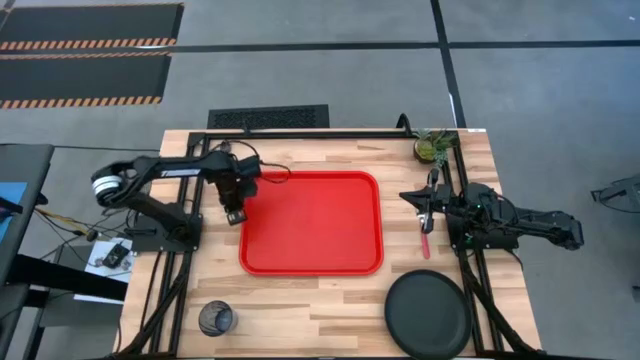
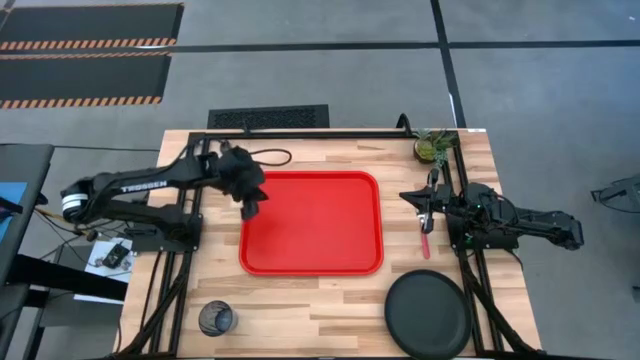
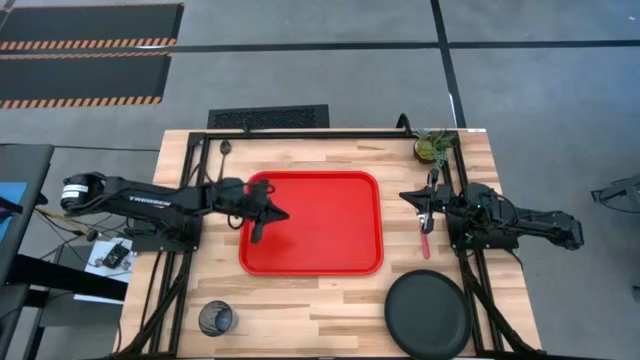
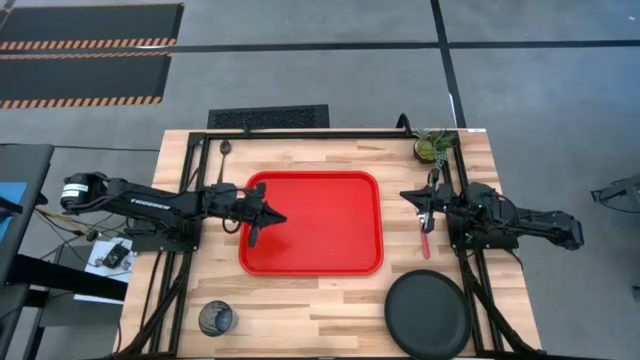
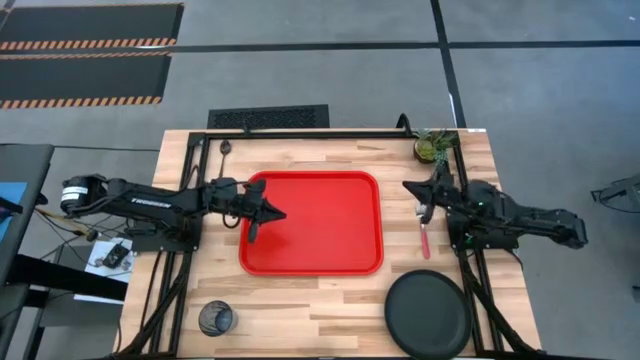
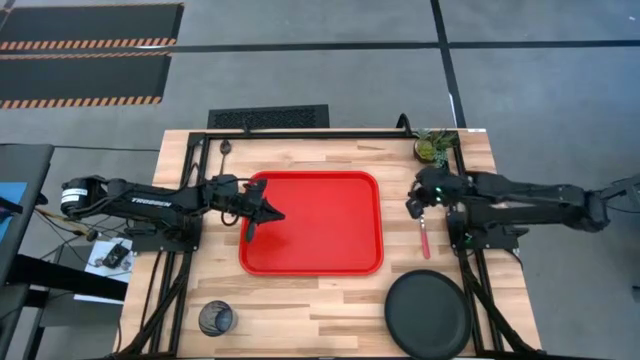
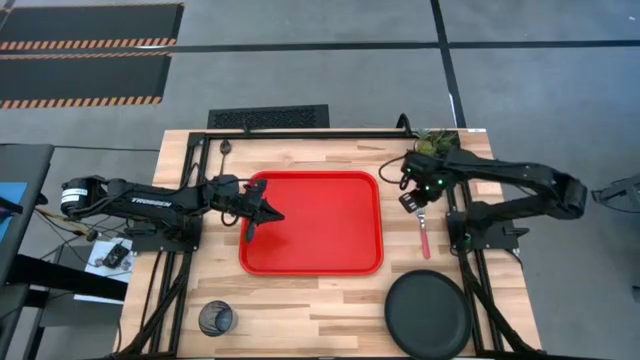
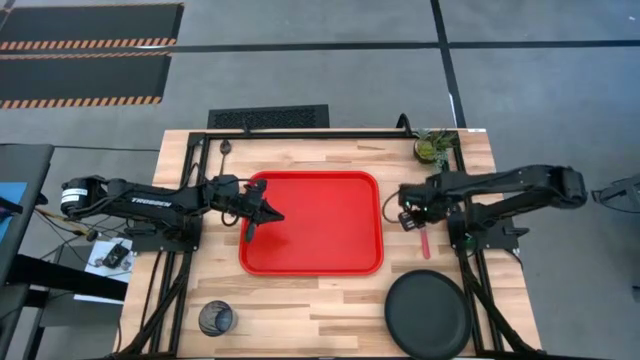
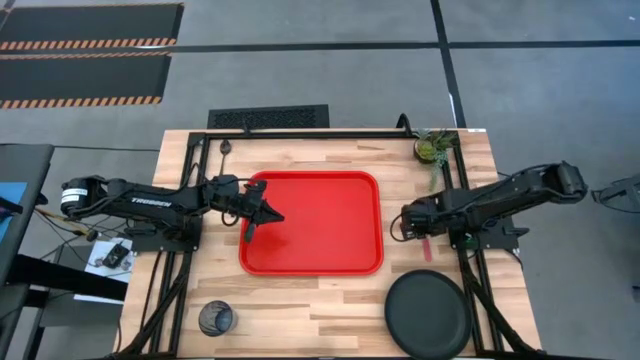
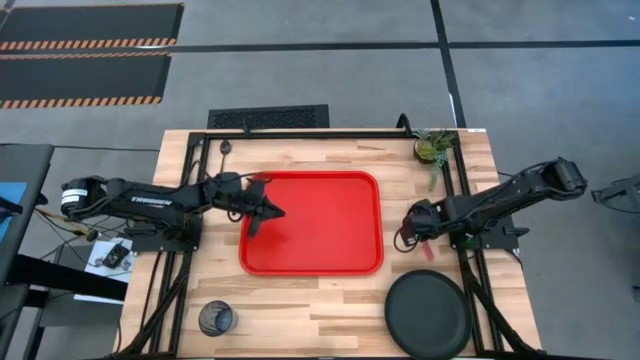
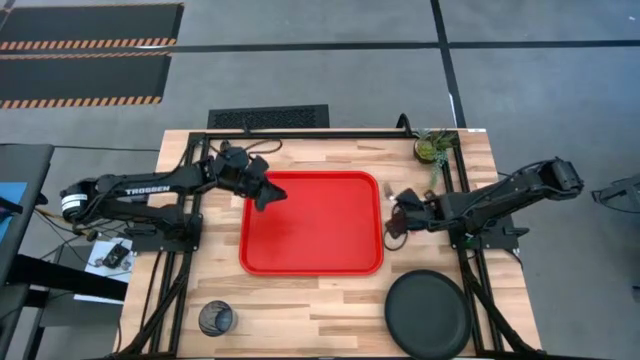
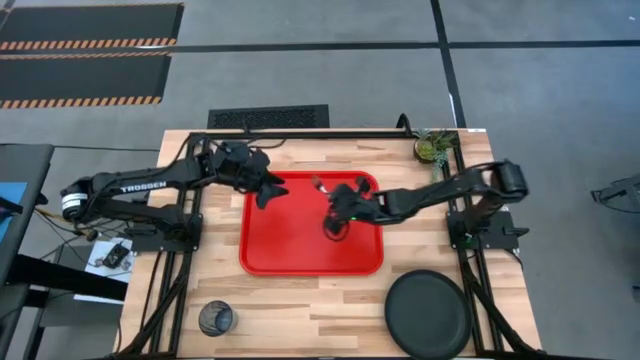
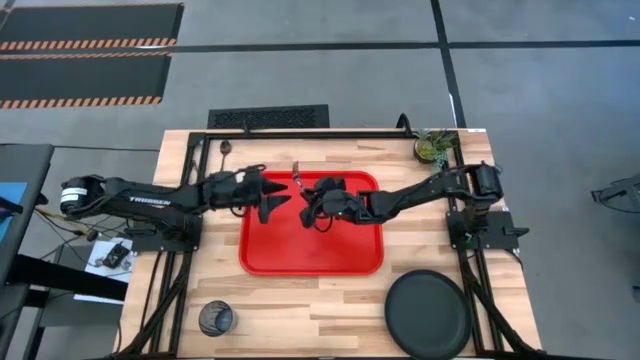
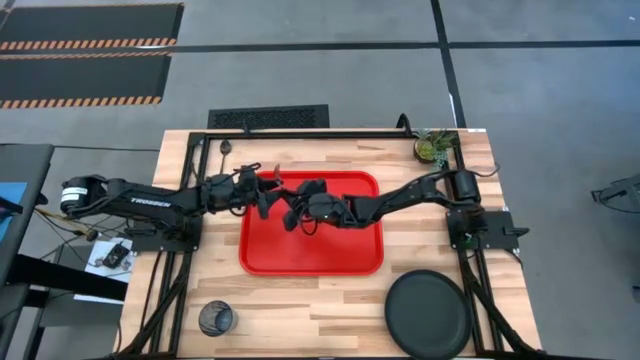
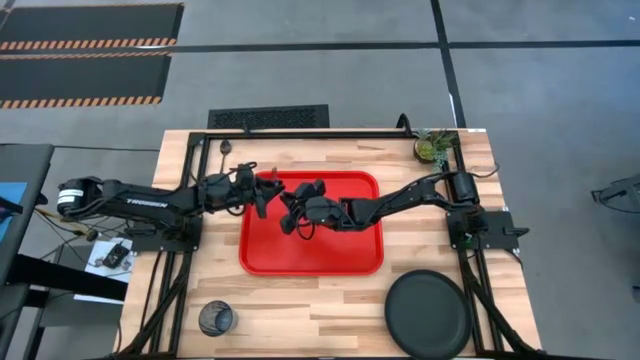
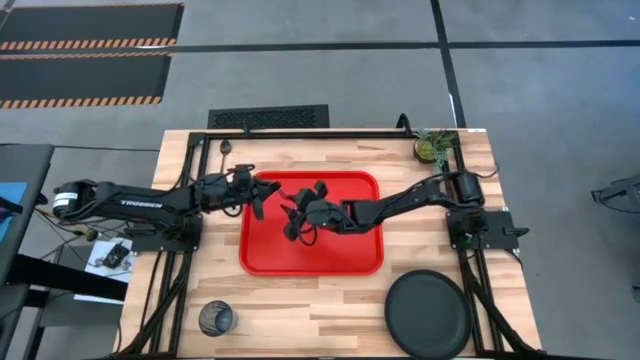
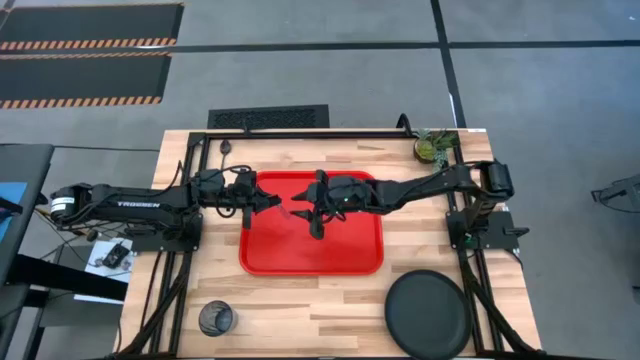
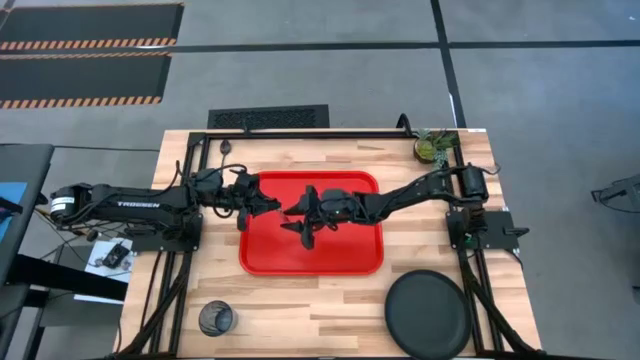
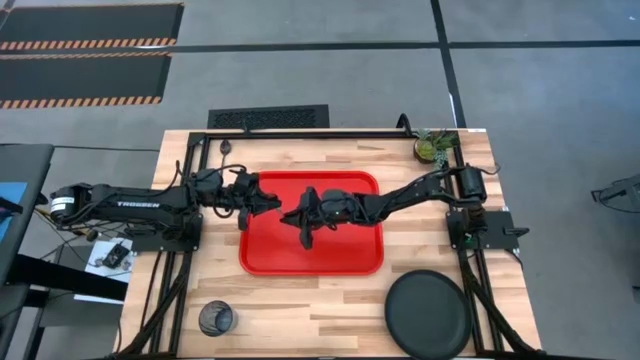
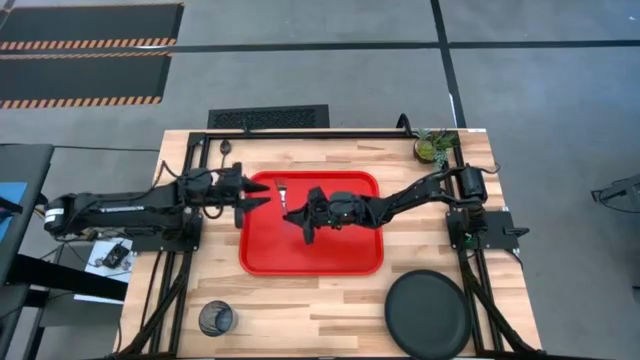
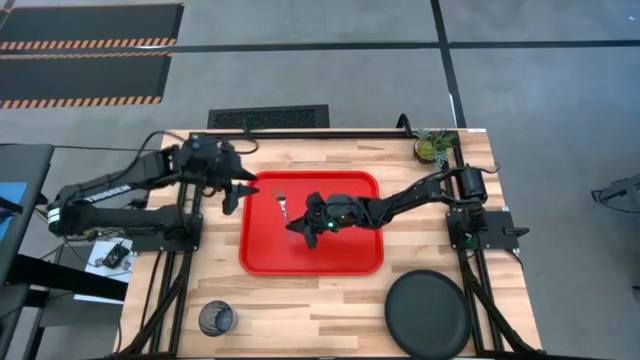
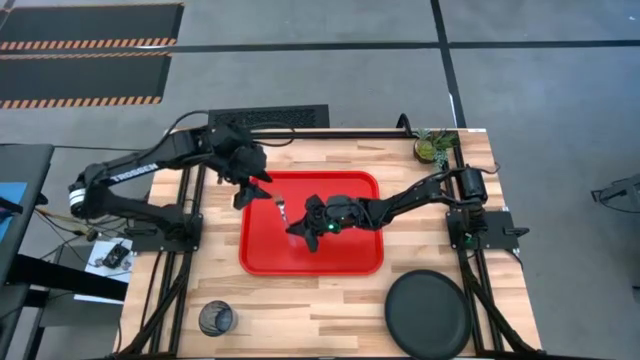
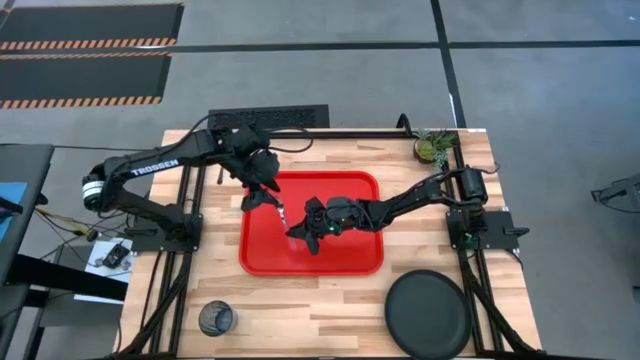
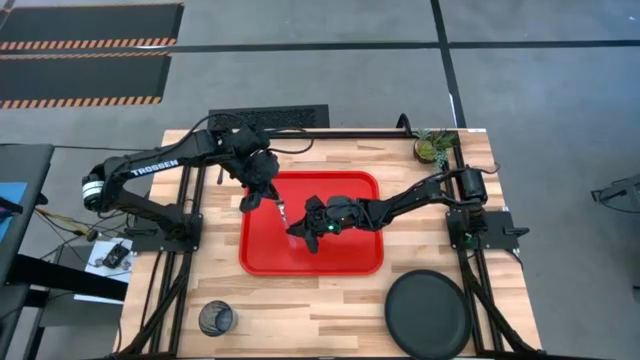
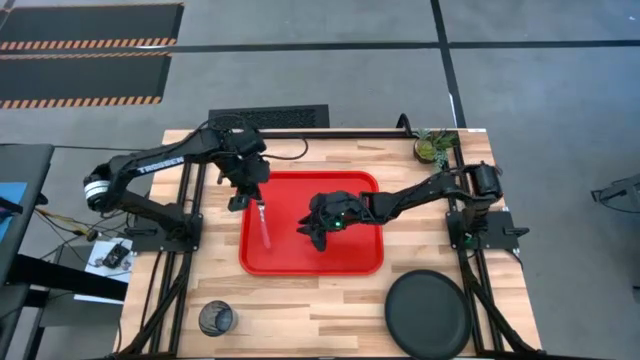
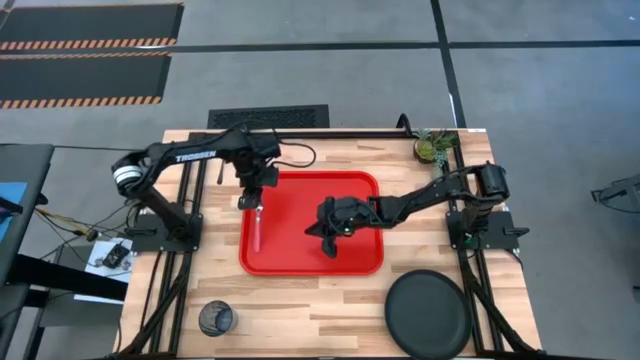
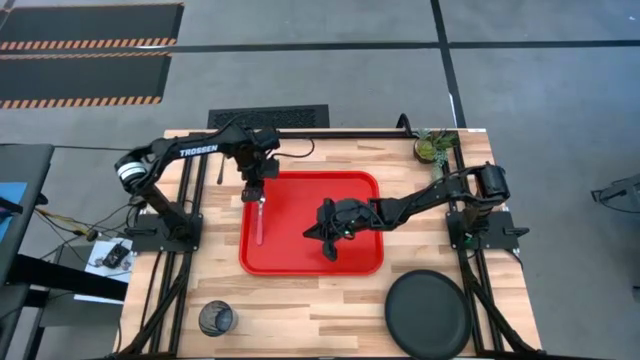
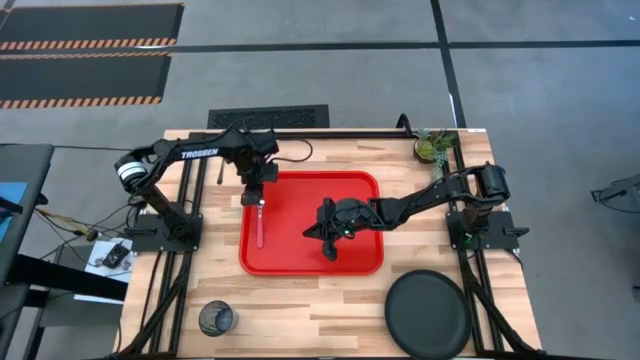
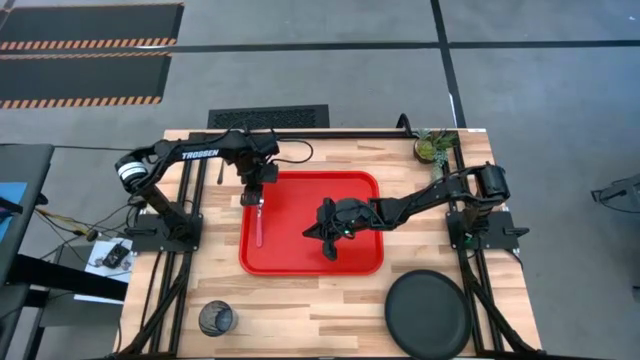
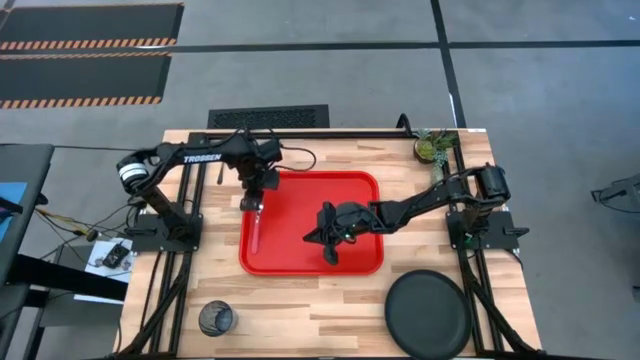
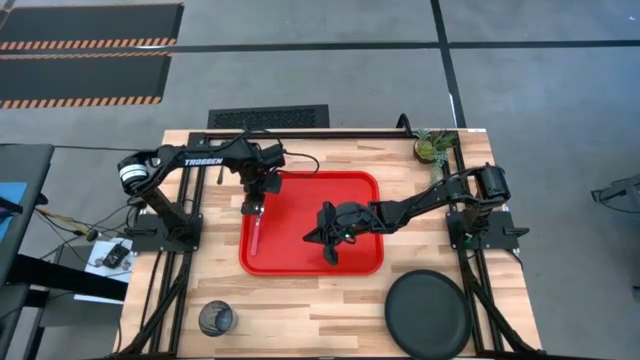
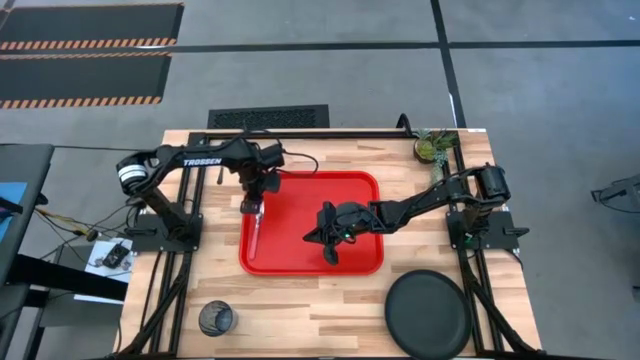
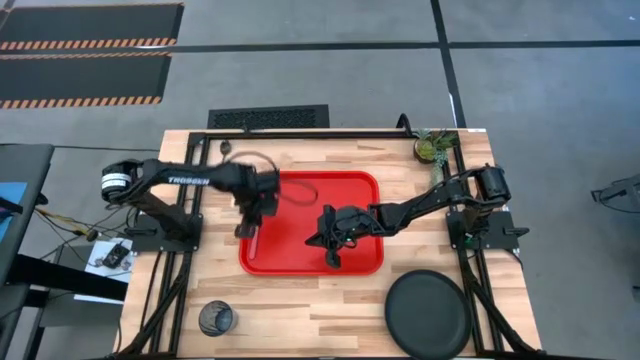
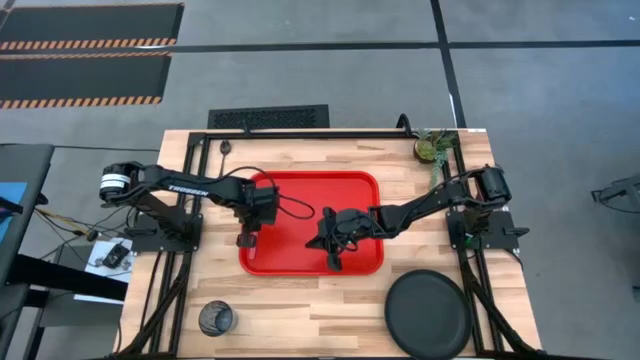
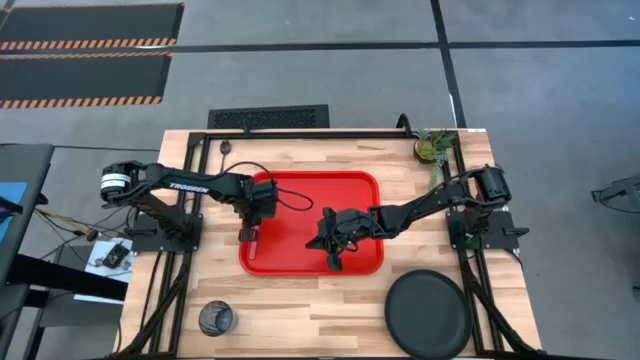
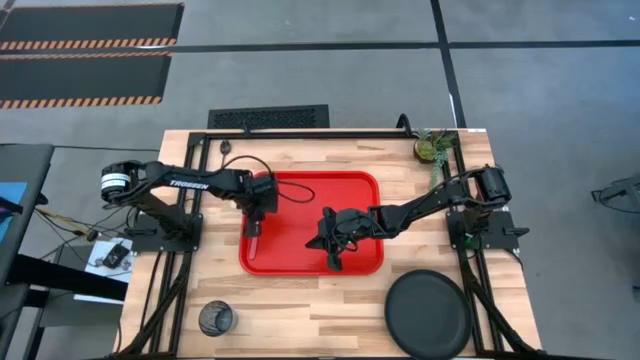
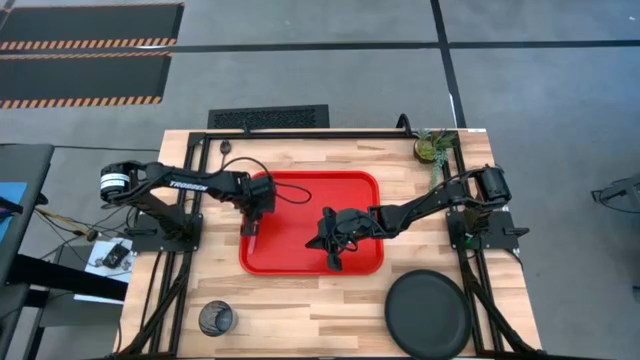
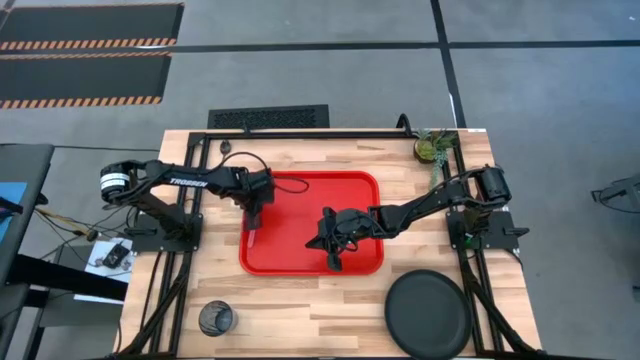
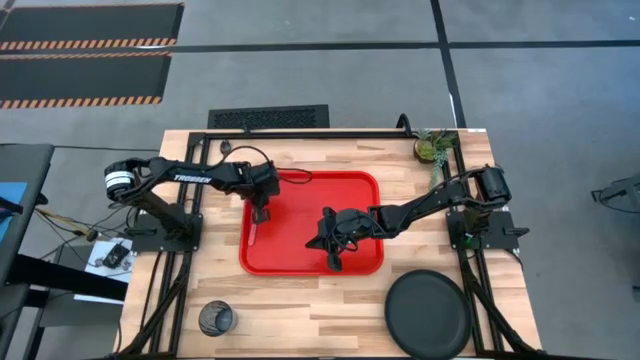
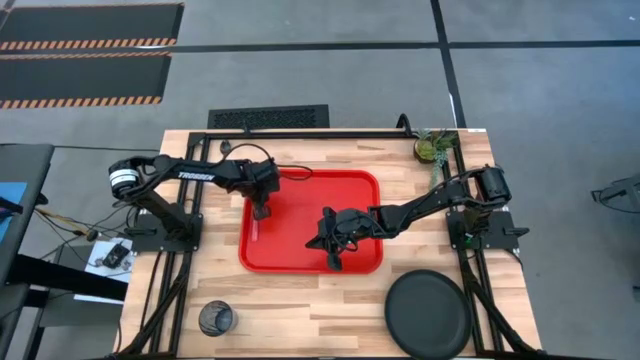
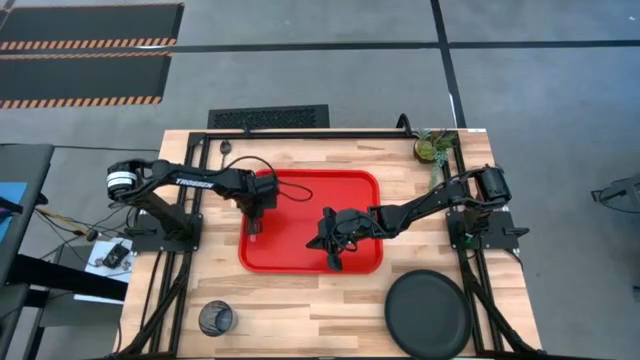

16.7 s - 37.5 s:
Task: Pick and place plate/cup/fork/spoon on tray
Put the pink fork on the red serving tray

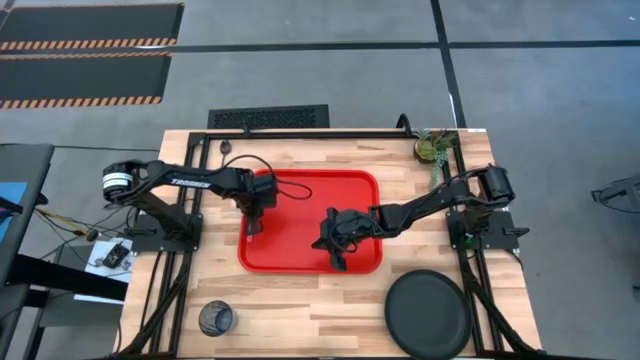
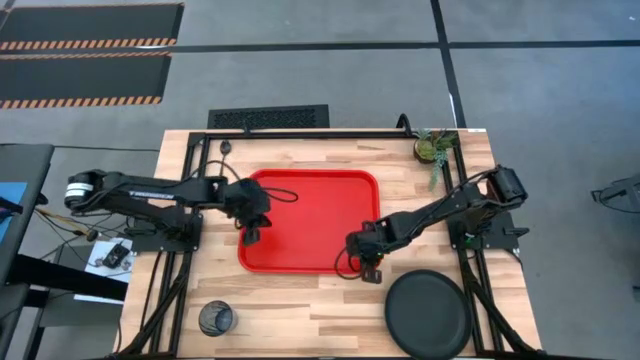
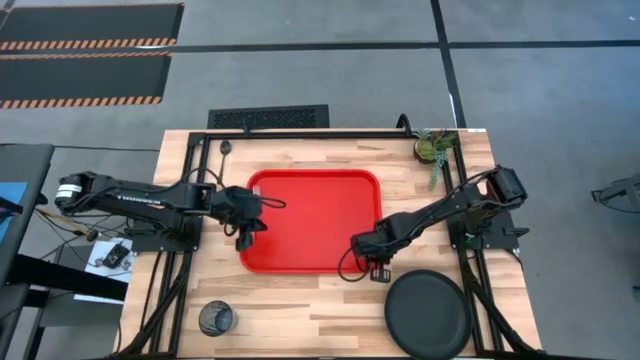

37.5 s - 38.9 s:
Adjust the red serving tray

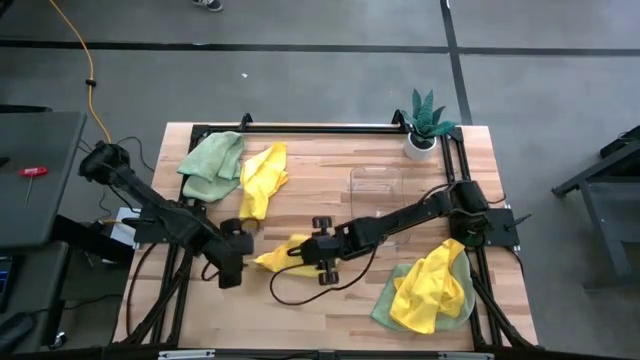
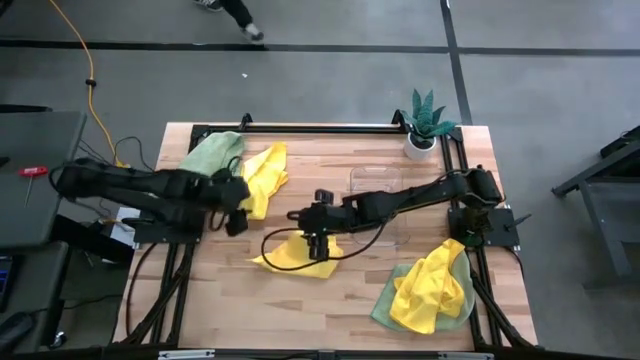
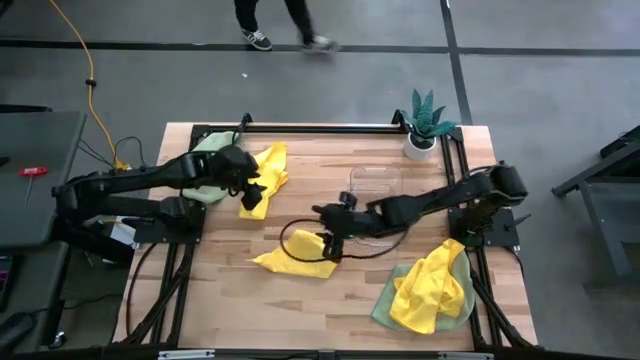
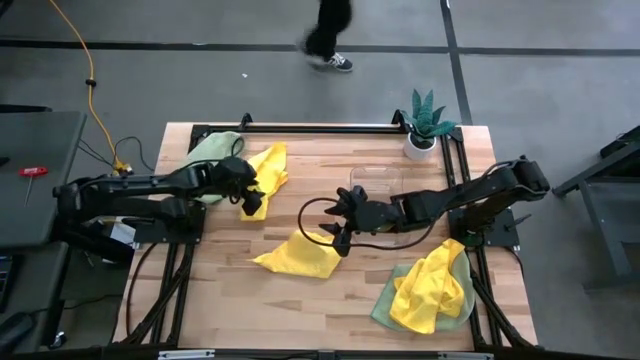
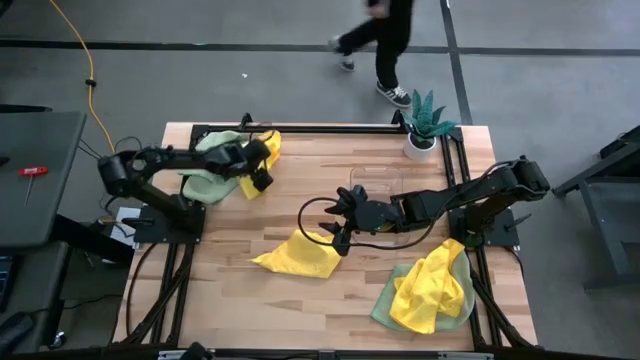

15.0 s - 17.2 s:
Task: Fold microfiber towels
Adjust the top yellow microfiber towel
